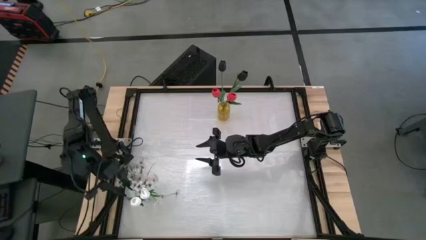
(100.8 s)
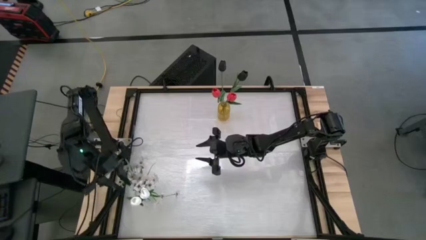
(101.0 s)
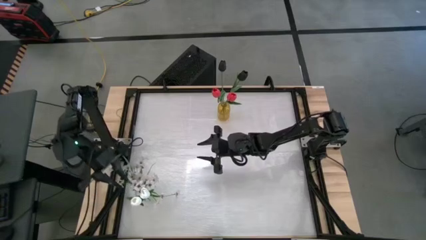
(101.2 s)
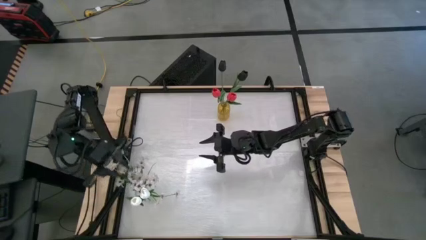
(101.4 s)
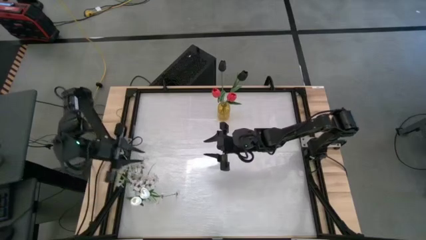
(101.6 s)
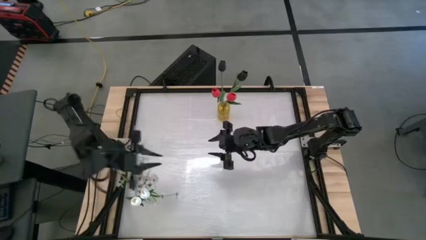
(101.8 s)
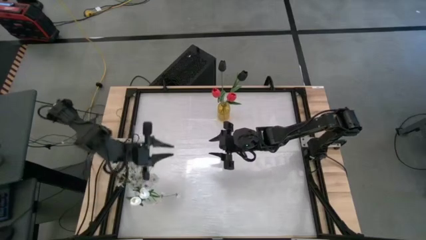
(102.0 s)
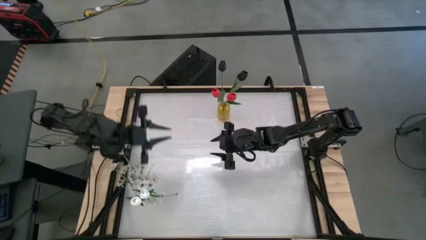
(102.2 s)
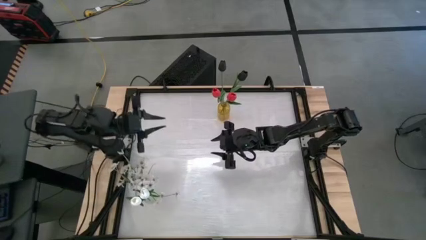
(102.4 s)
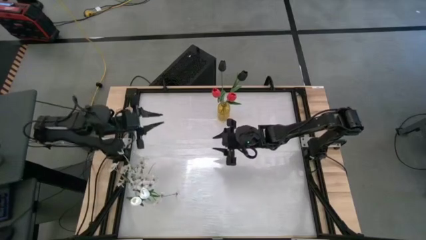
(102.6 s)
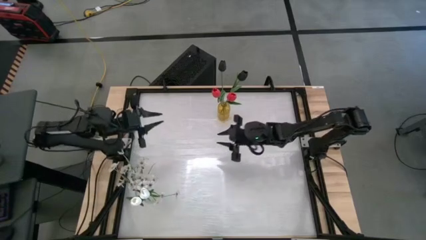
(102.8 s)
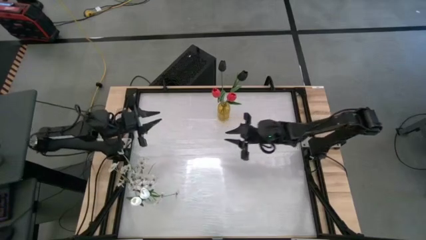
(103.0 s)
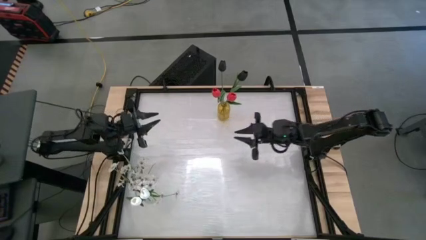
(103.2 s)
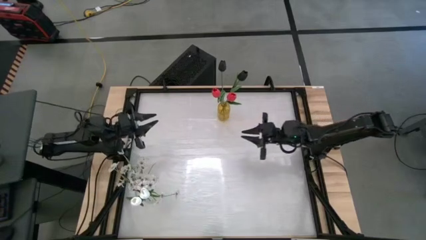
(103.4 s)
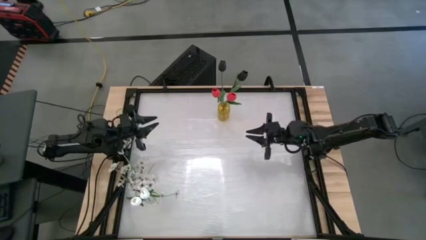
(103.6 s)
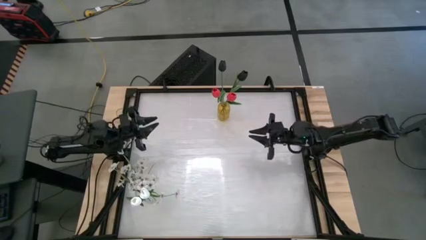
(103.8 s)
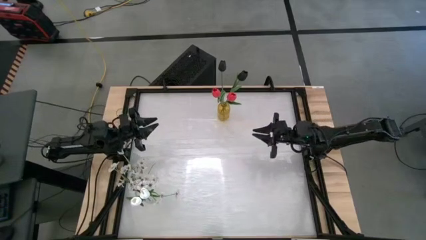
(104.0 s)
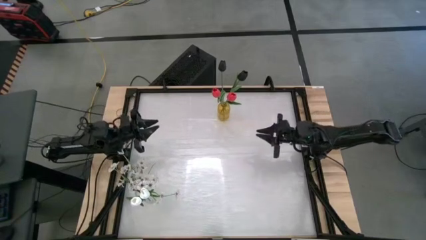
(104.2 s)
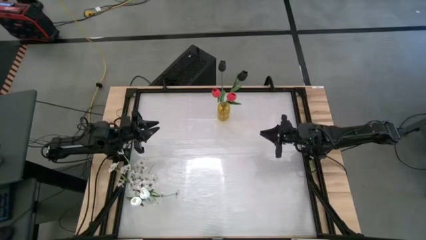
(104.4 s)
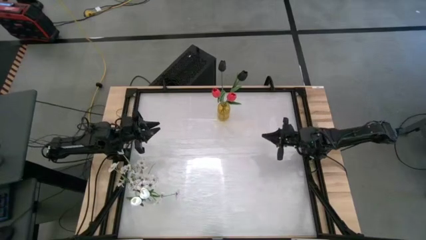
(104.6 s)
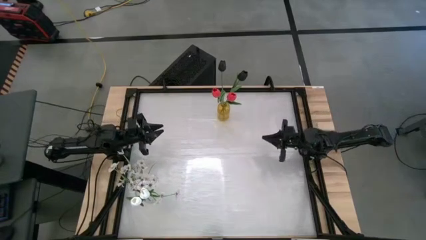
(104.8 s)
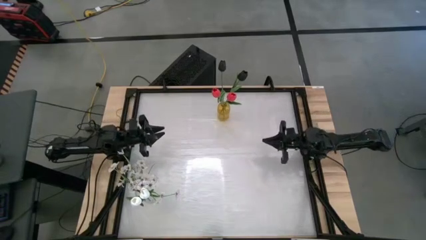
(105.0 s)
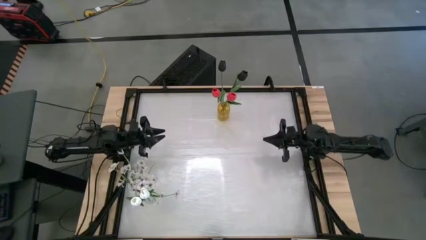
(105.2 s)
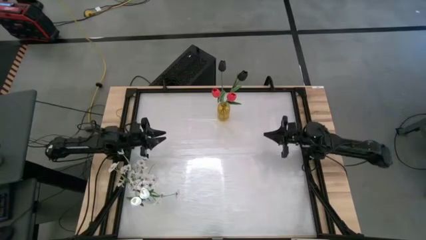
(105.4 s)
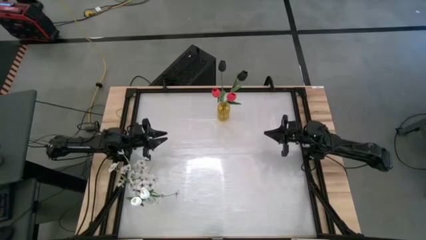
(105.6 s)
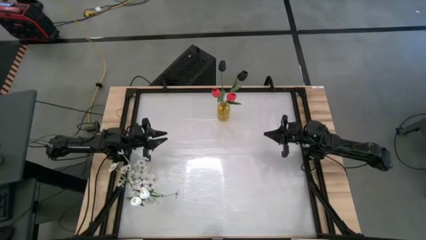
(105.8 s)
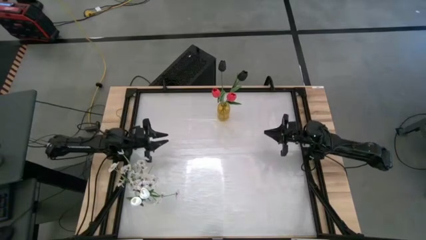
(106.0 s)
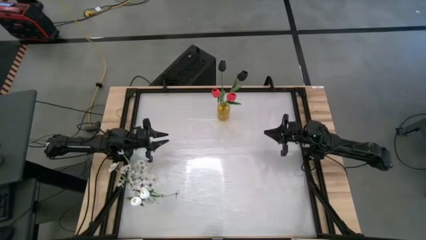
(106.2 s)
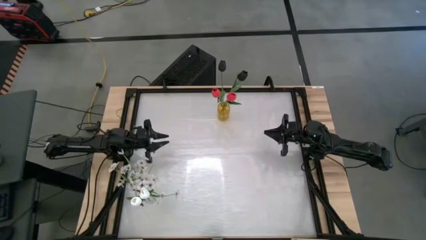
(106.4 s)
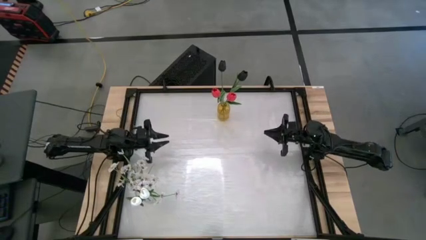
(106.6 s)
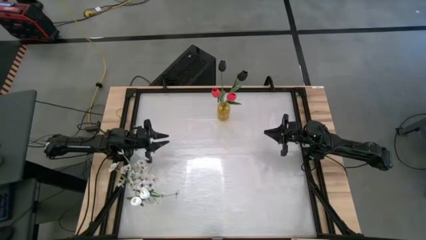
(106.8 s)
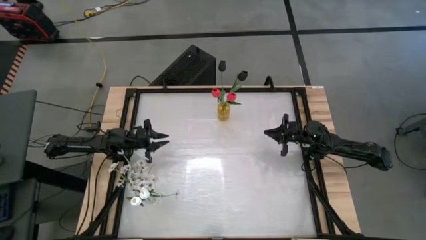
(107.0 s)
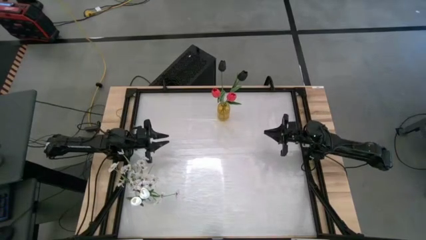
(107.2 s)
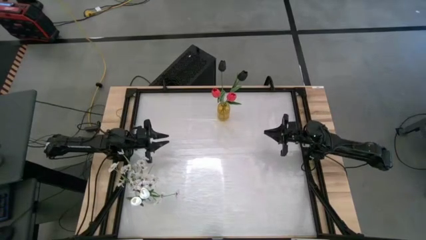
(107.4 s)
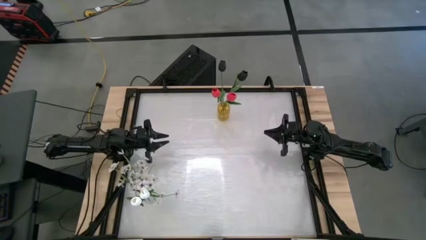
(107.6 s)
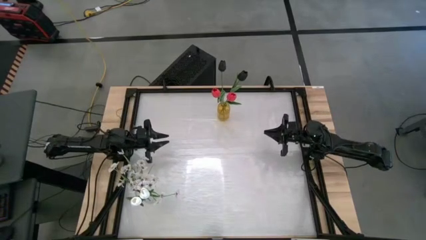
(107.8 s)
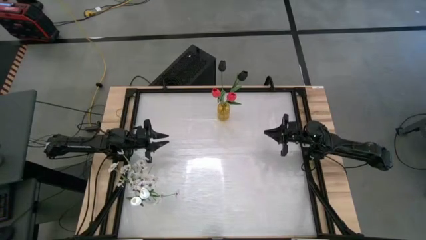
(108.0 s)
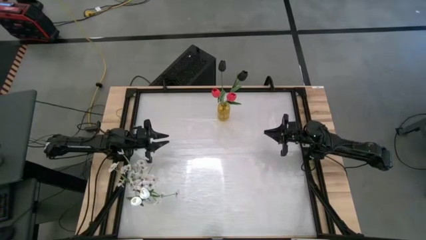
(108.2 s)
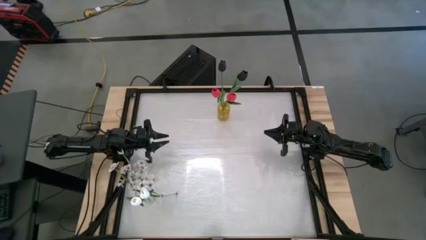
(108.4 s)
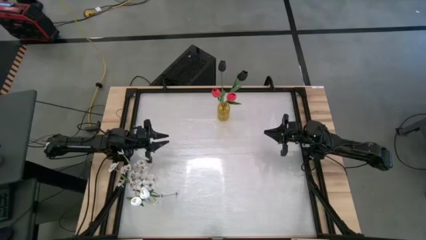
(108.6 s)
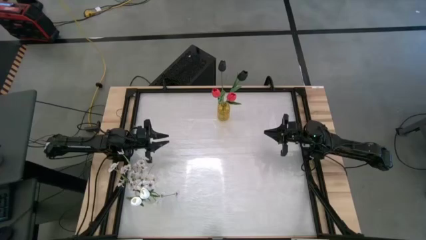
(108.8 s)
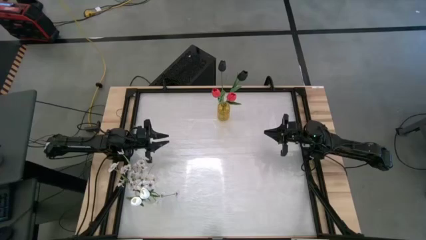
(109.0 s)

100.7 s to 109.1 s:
Task: Sort flowers into vase by color
Return to Home Position

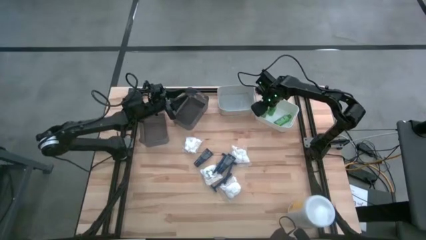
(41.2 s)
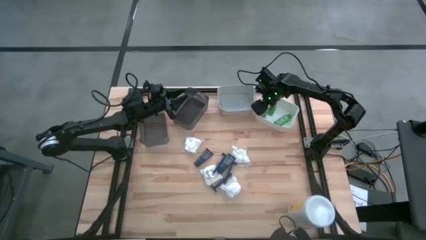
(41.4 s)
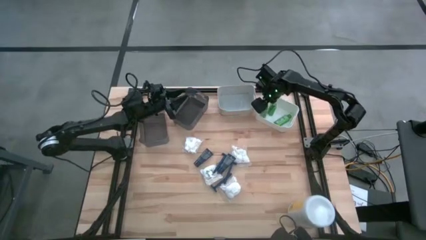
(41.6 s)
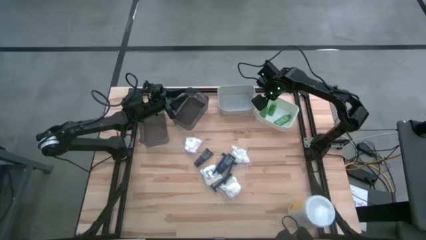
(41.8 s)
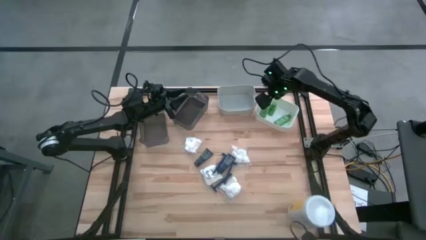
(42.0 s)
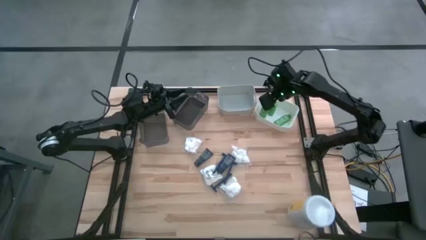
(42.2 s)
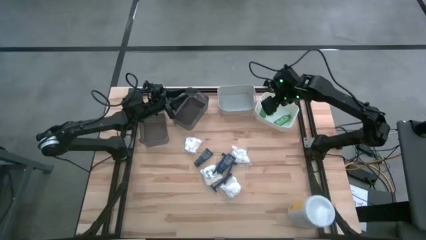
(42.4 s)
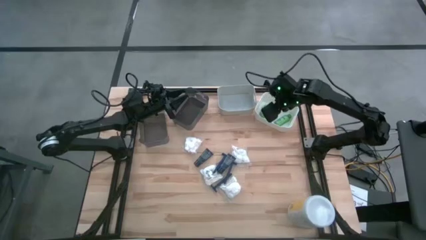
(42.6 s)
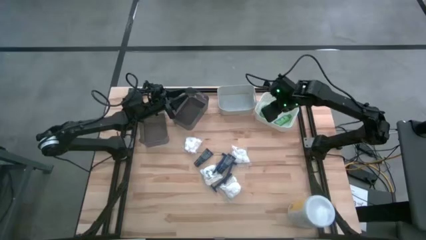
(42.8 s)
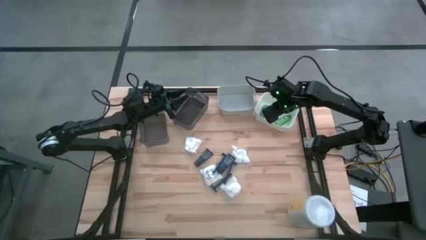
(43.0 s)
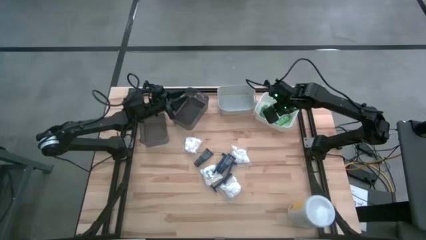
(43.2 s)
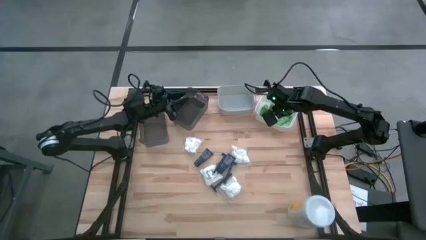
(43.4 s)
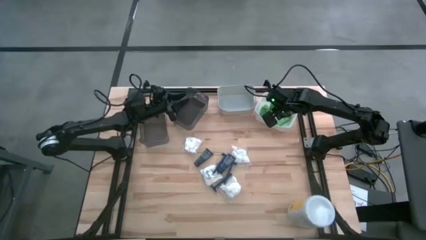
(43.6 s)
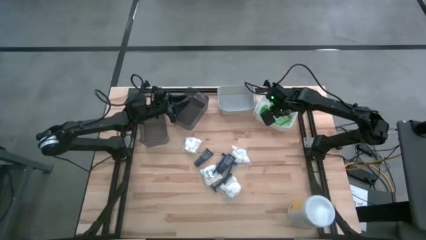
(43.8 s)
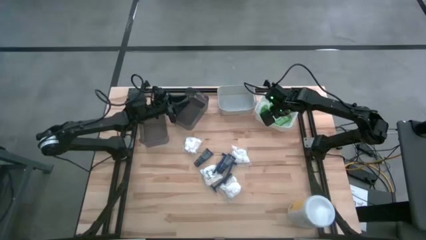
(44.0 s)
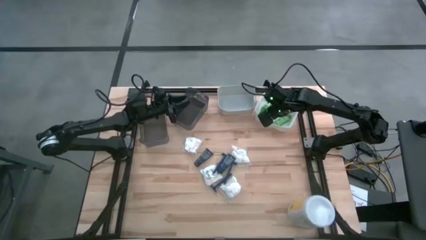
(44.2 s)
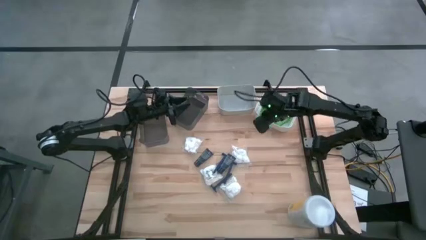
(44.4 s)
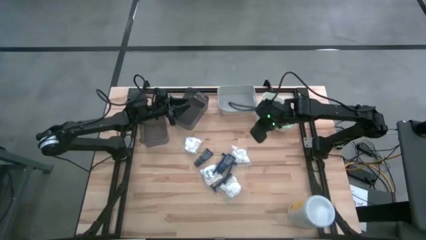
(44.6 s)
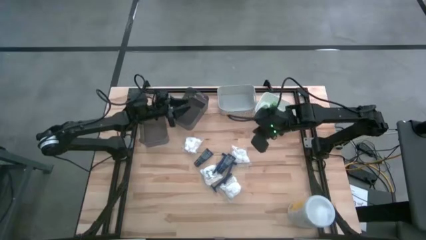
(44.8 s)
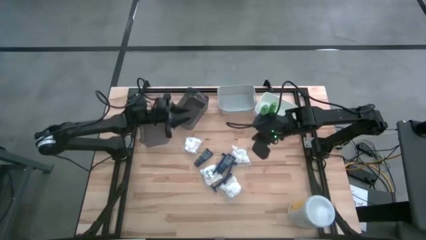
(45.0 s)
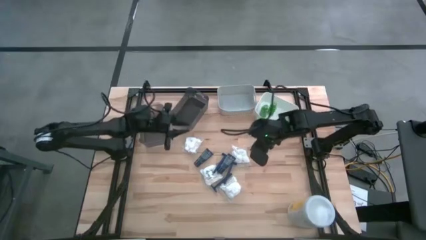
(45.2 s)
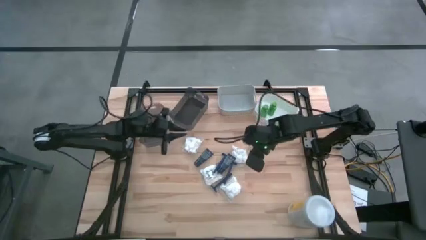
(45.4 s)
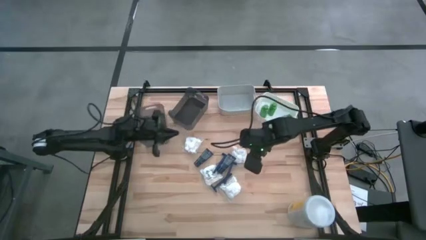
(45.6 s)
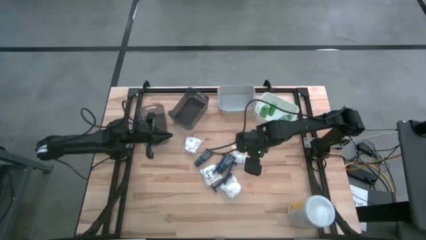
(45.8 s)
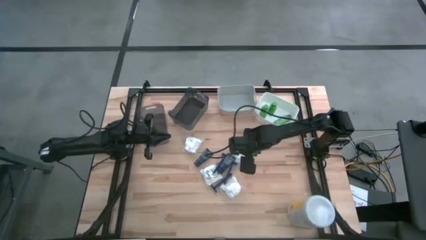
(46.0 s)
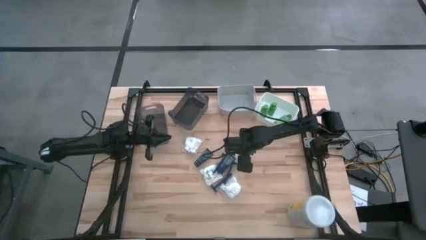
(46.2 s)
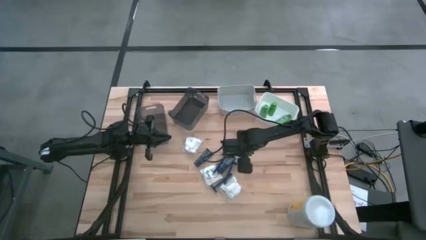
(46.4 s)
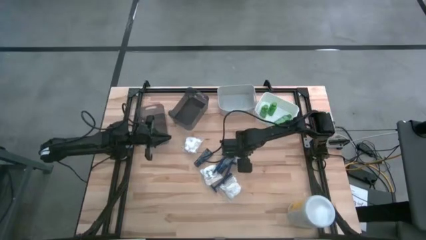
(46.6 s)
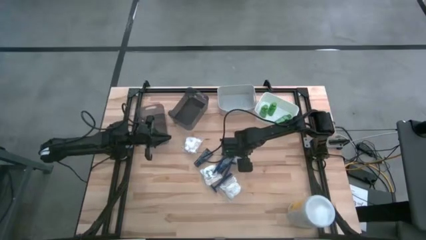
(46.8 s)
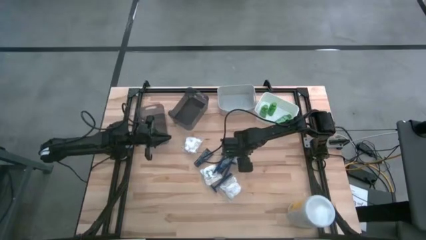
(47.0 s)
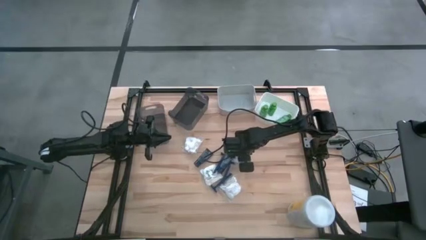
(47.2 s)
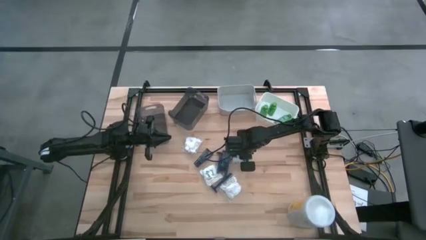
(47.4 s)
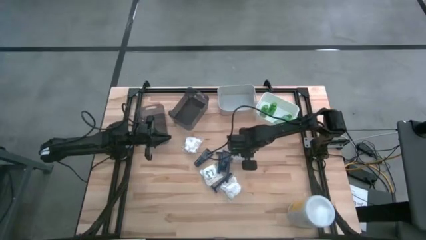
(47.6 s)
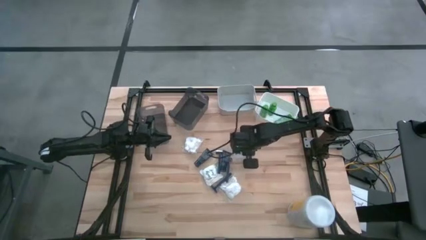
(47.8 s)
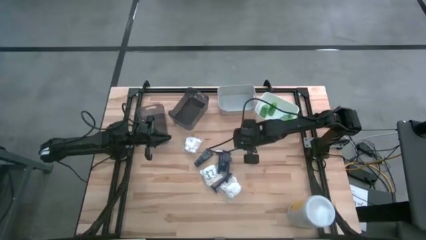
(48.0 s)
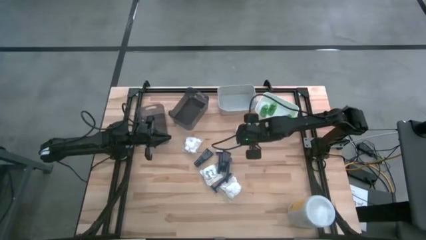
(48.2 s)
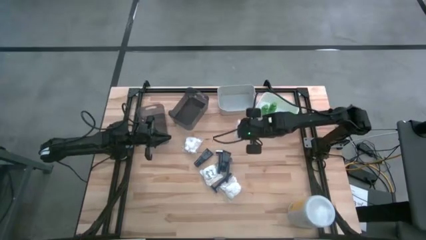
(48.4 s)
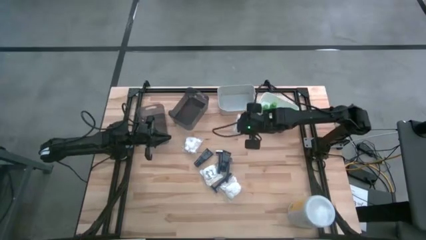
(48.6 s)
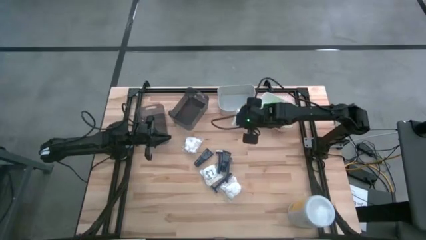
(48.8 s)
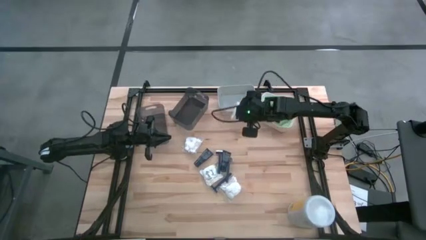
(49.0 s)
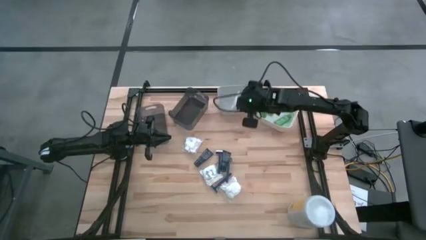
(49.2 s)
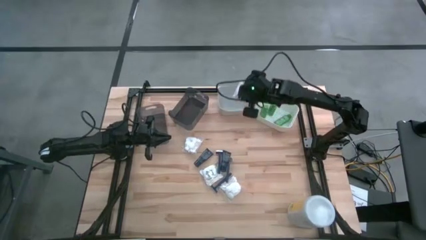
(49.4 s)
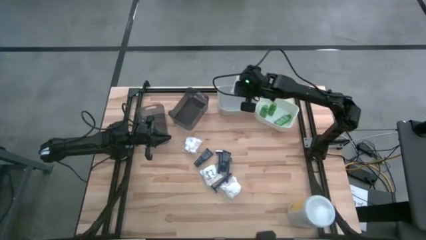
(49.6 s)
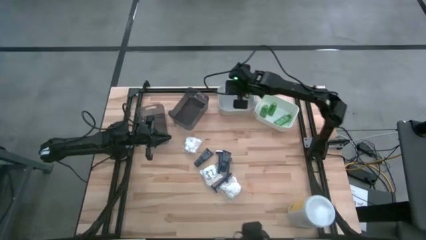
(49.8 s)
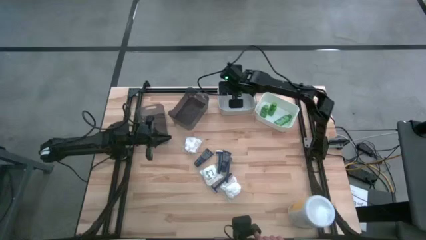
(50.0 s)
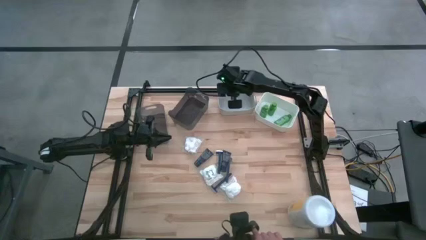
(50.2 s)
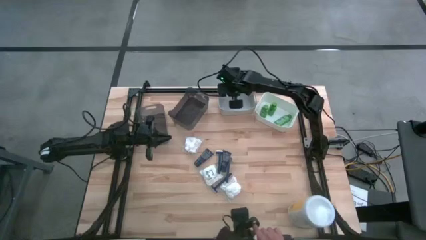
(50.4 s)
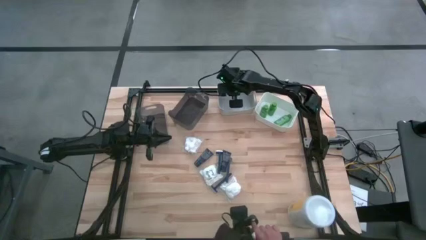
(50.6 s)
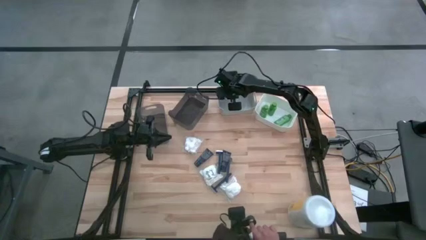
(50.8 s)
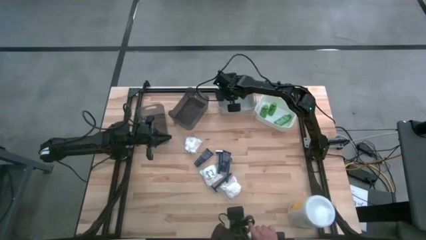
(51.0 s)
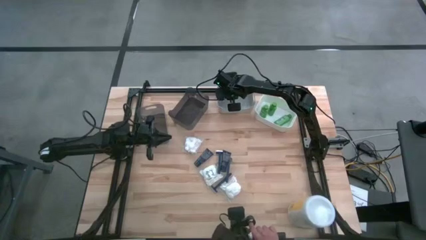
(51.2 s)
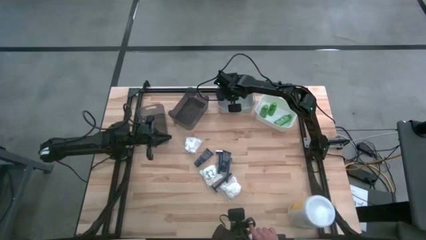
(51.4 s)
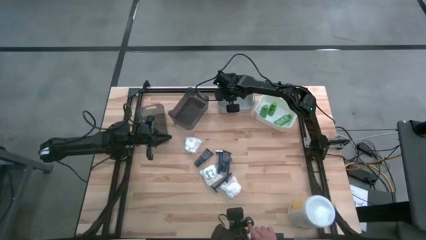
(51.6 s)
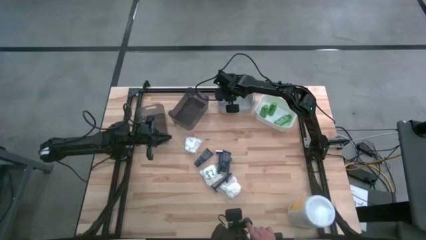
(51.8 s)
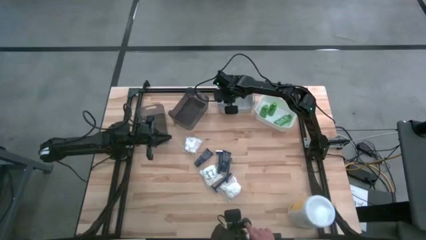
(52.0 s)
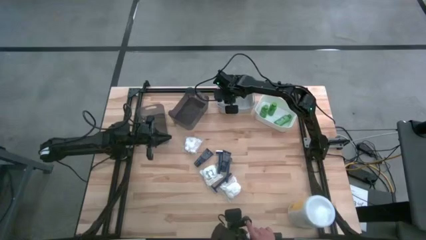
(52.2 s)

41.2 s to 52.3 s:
Task: Pick & Place Travel size toiletries
Put the cotton pack into the gray bin
